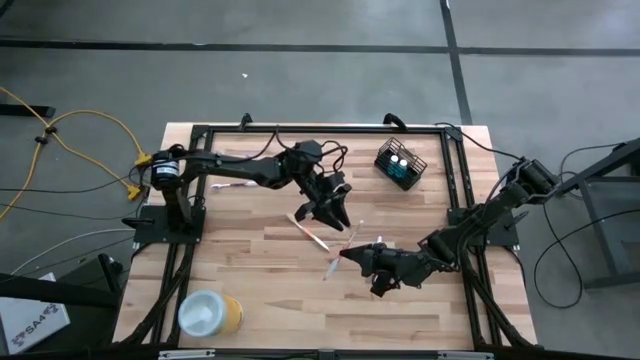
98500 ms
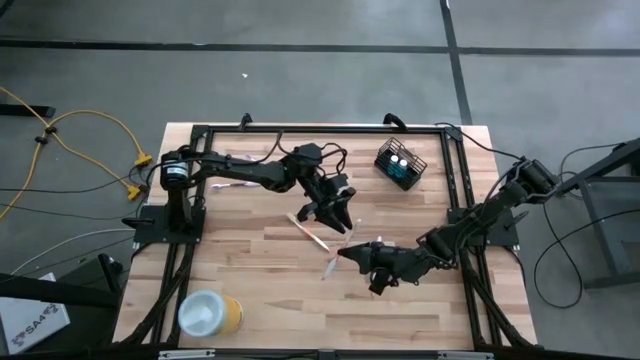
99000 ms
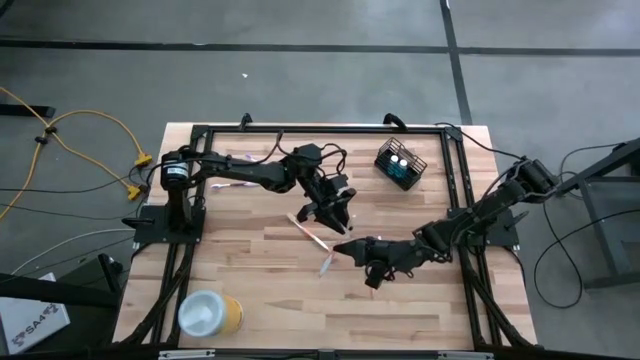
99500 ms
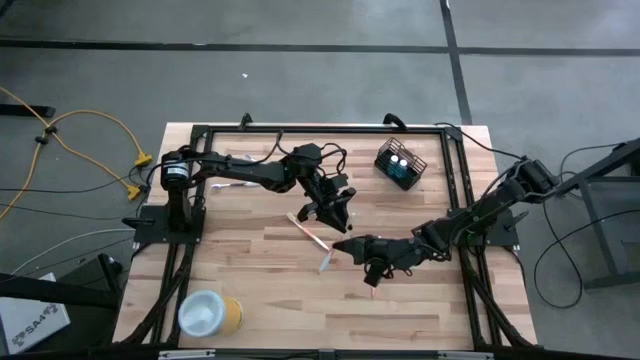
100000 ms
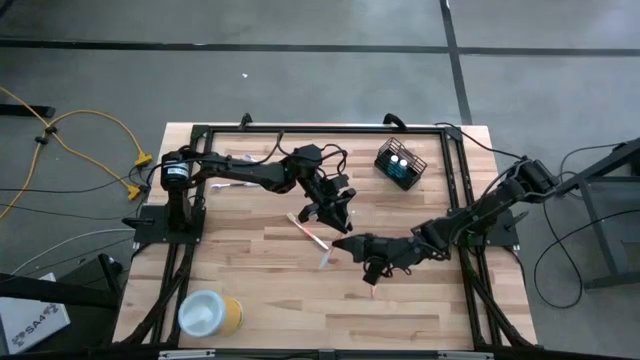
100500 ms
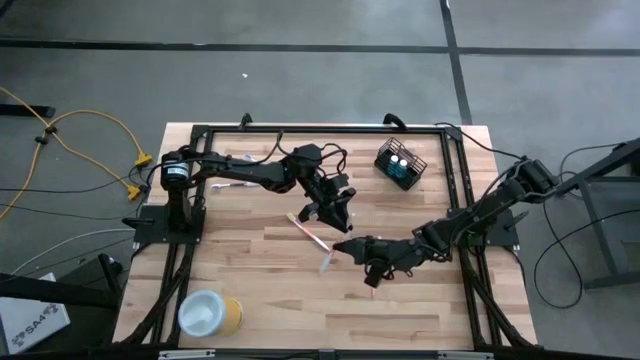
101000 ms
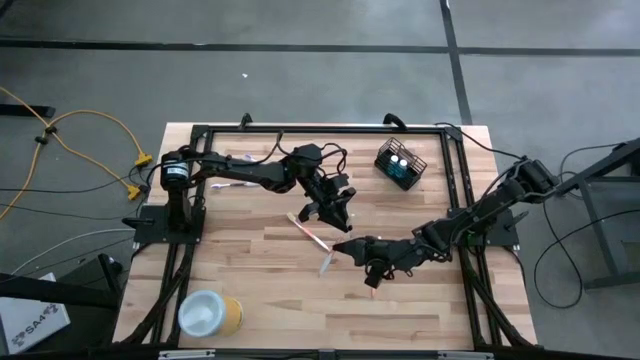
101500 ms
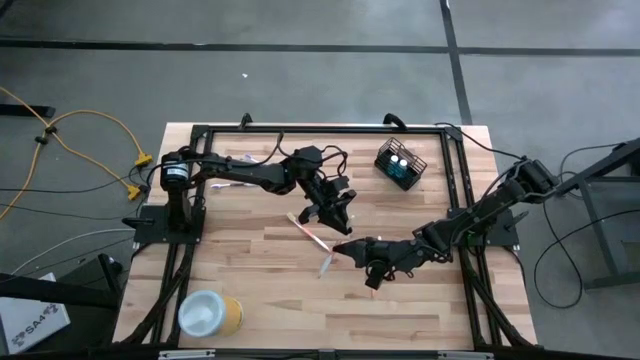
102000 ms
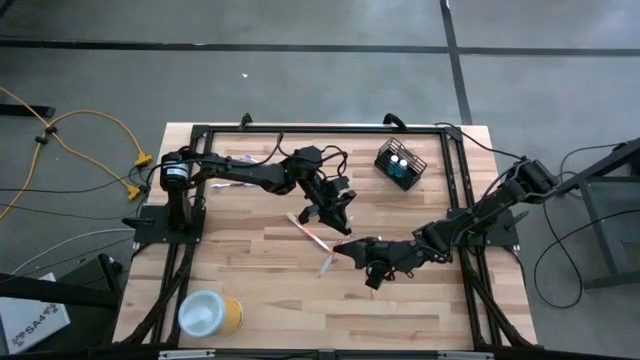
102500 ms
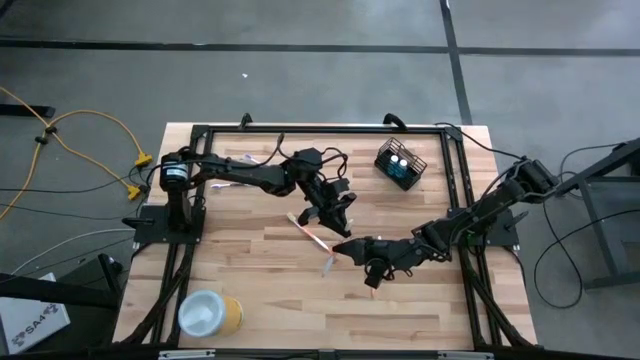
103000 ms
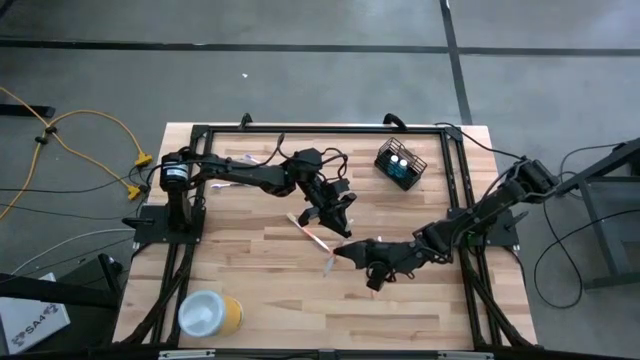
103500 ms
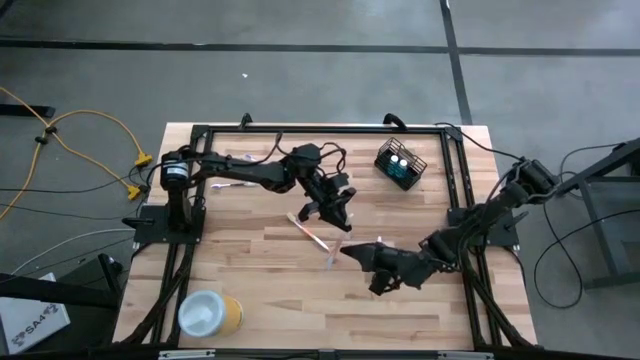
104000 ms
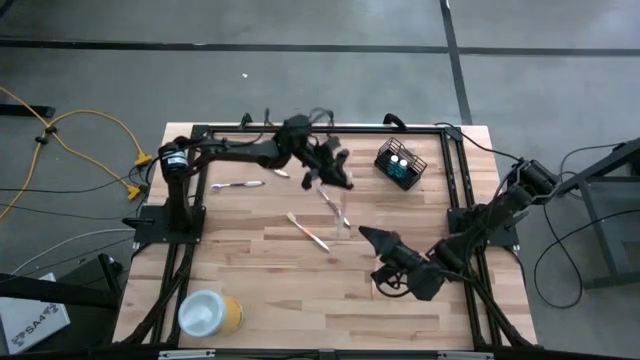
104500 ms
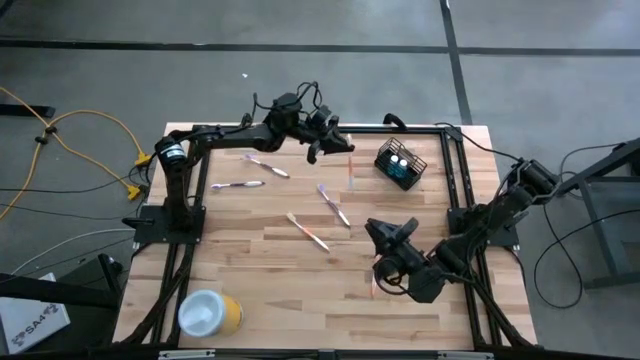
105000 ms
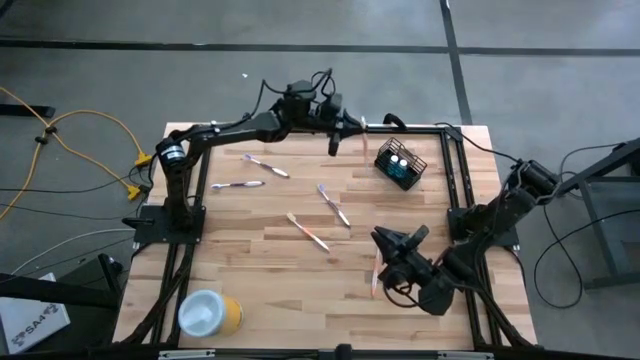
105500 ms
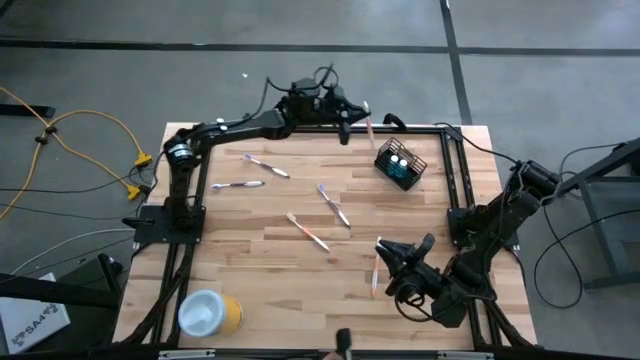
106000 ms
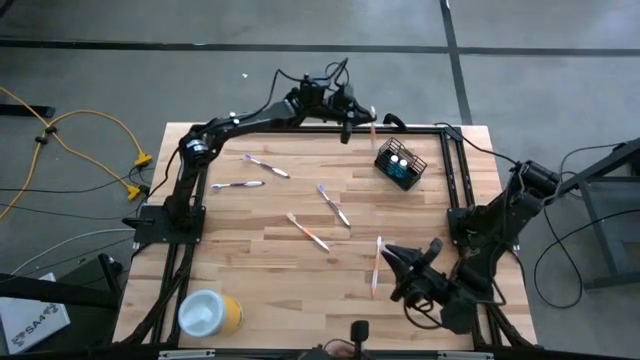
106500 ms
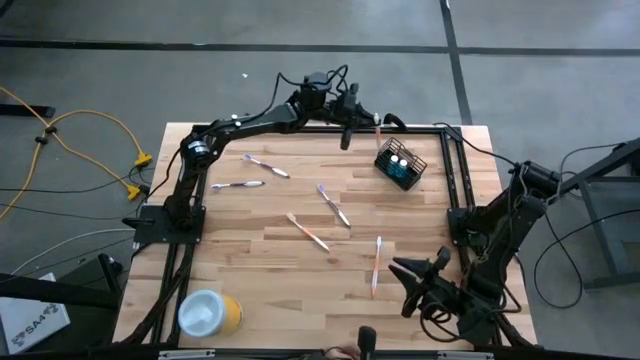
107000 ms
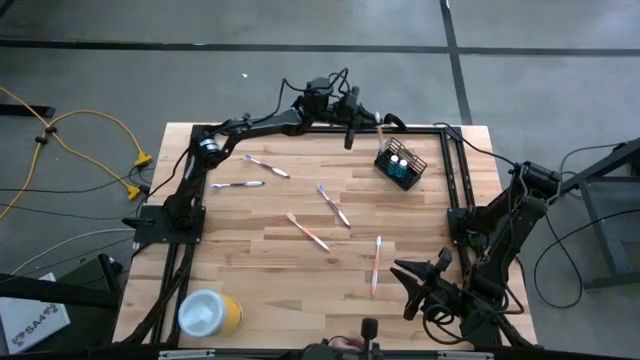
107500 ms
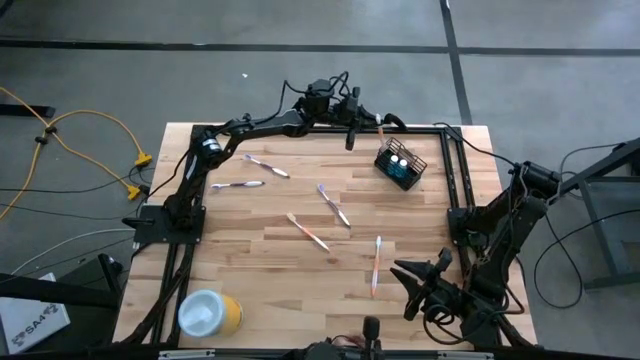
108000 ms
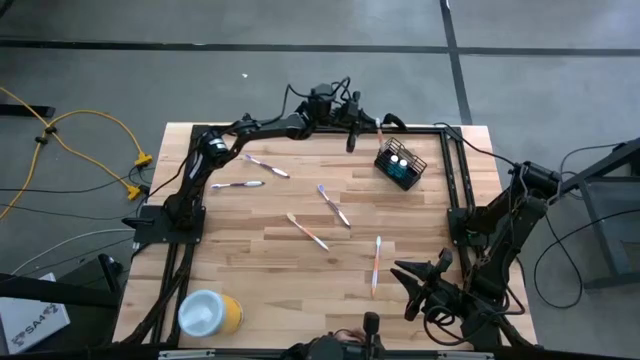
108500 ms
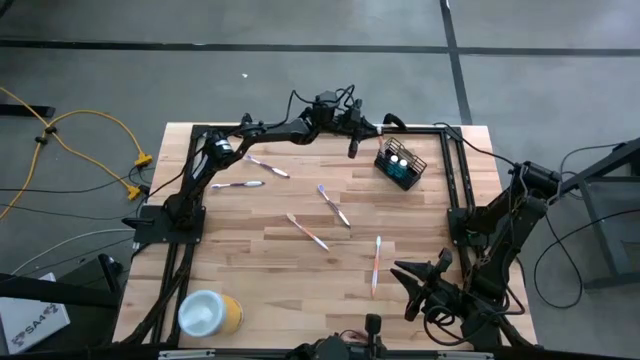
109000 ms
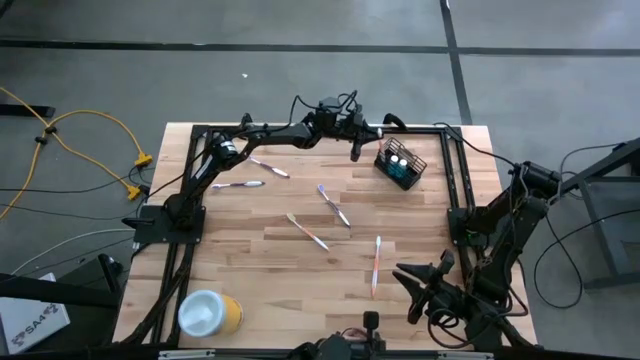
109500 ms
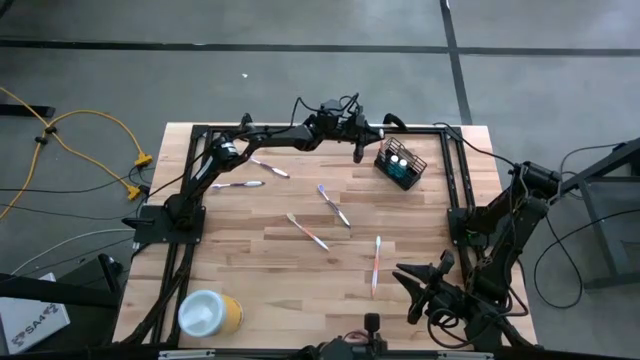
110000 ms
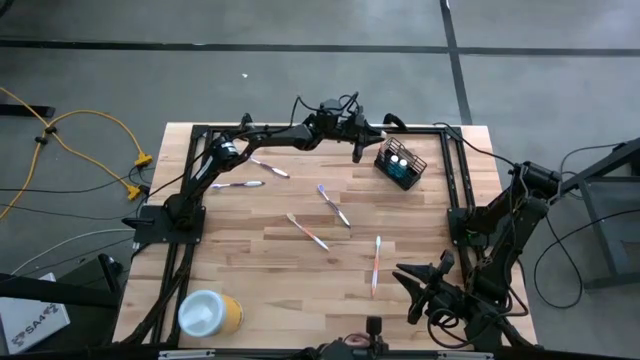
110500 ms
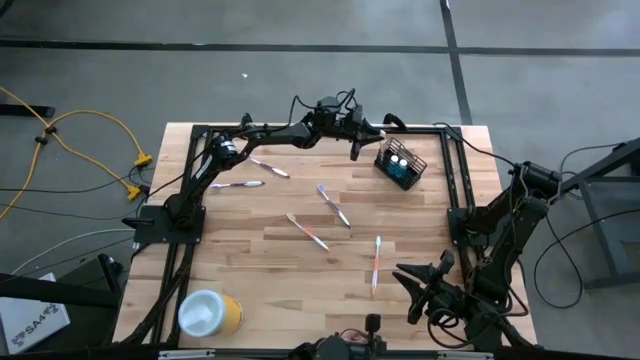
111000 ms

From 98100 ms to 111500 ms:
Task: Pick & Place toothbrushing station
Put the top orange toothbrush into the left of the black mesh organizer
